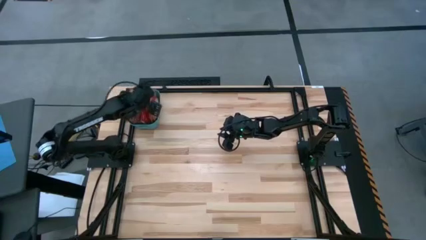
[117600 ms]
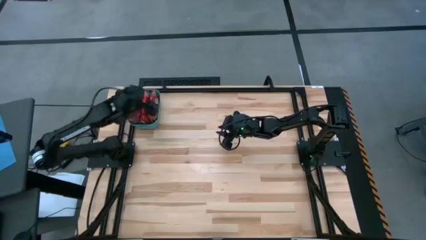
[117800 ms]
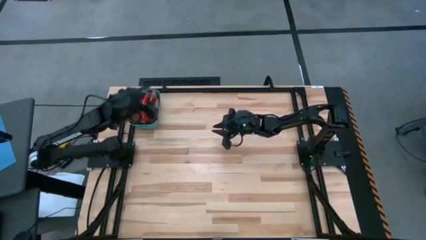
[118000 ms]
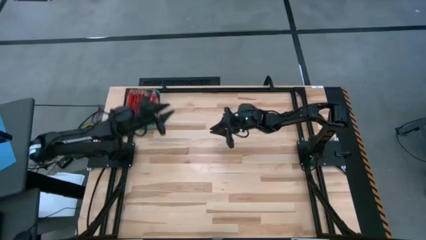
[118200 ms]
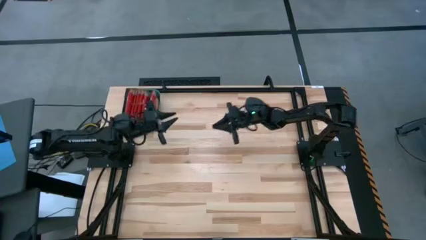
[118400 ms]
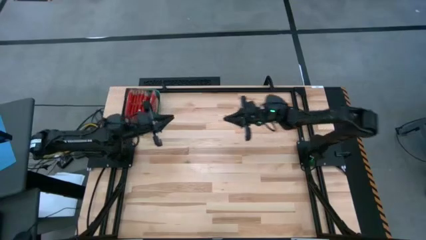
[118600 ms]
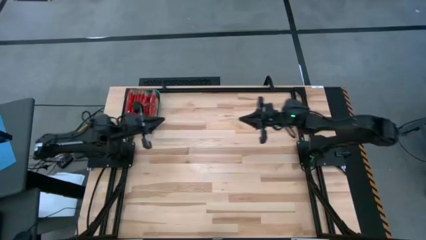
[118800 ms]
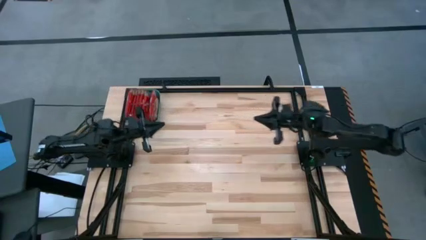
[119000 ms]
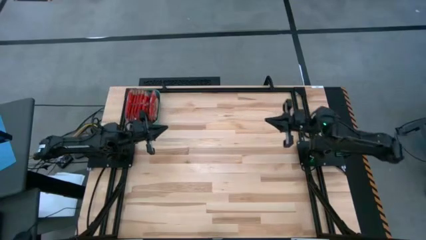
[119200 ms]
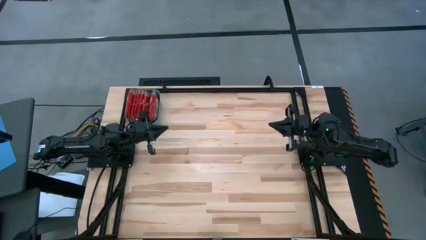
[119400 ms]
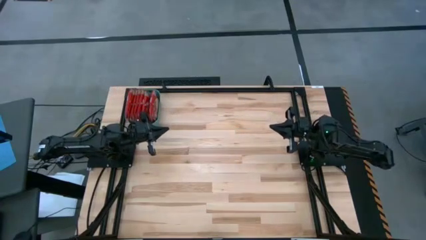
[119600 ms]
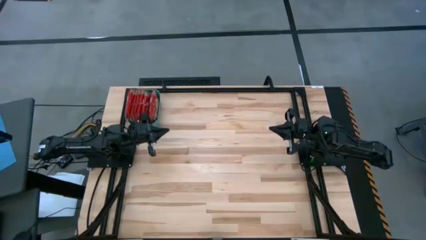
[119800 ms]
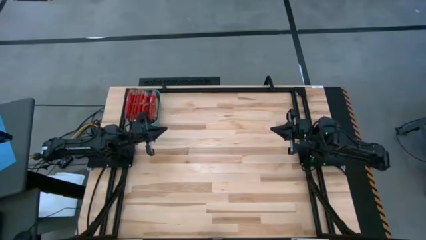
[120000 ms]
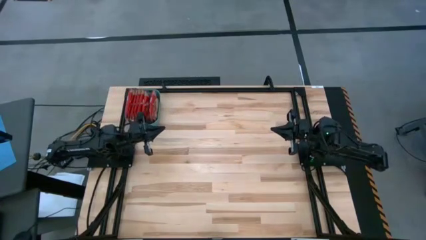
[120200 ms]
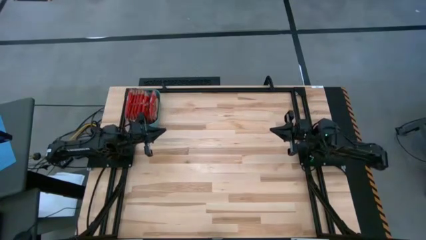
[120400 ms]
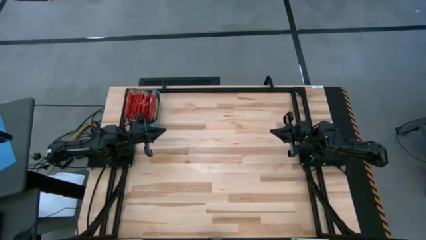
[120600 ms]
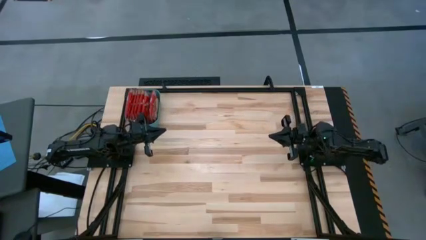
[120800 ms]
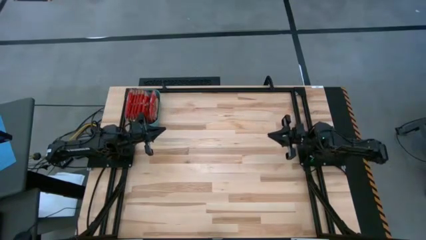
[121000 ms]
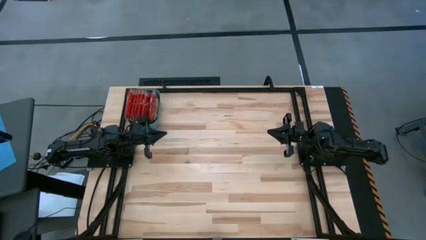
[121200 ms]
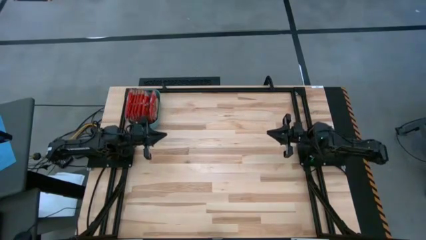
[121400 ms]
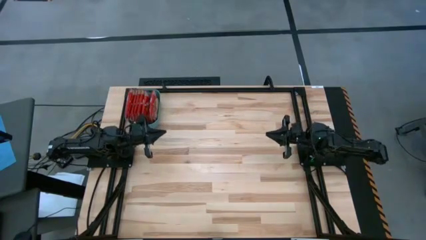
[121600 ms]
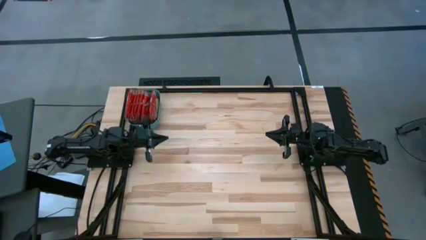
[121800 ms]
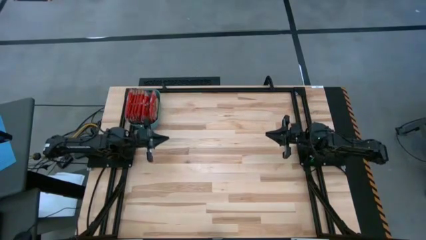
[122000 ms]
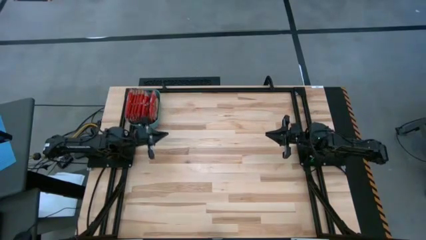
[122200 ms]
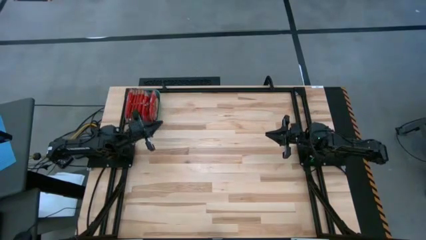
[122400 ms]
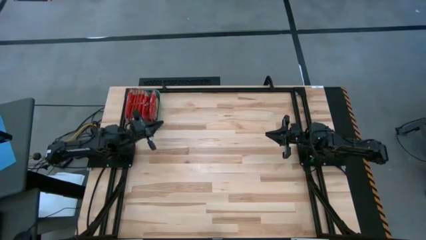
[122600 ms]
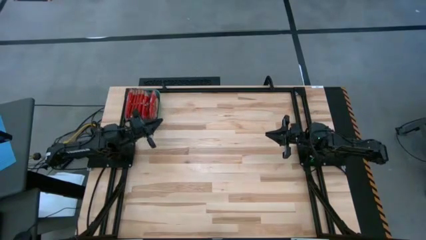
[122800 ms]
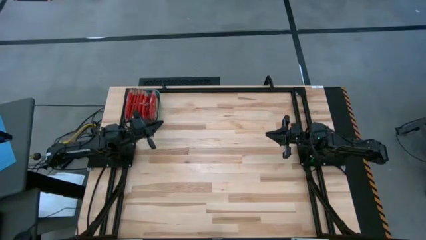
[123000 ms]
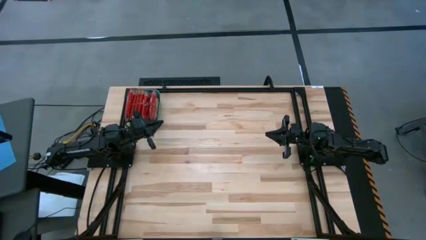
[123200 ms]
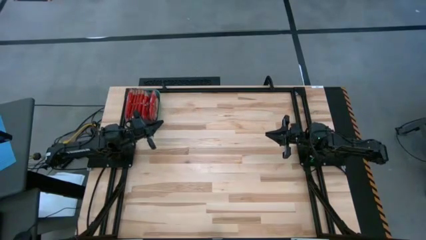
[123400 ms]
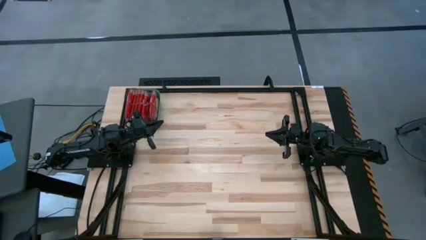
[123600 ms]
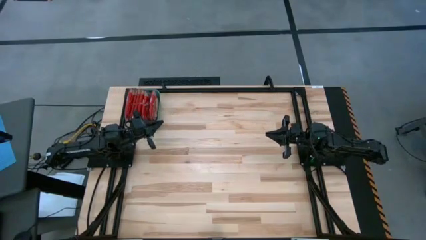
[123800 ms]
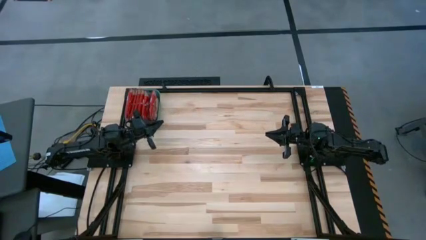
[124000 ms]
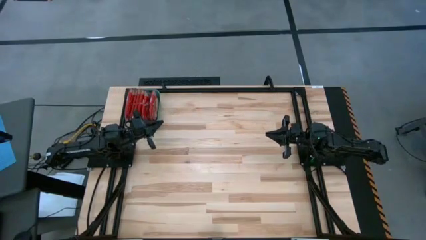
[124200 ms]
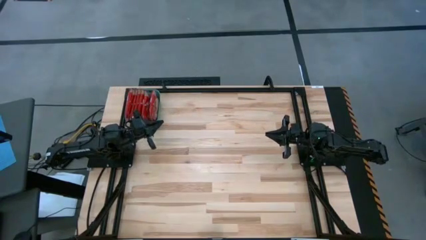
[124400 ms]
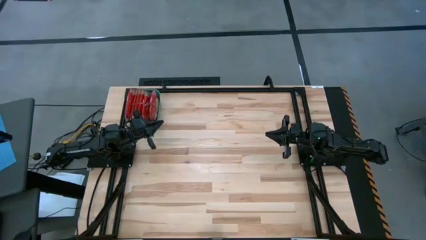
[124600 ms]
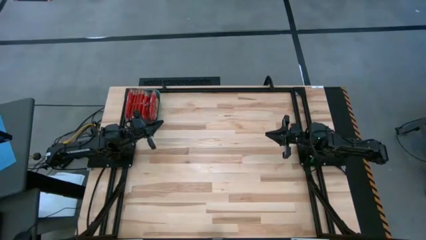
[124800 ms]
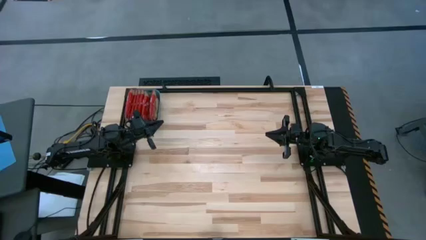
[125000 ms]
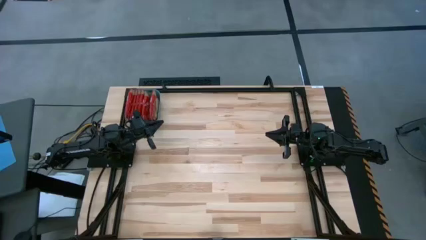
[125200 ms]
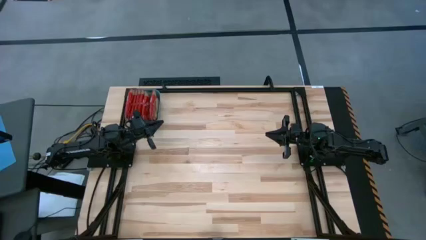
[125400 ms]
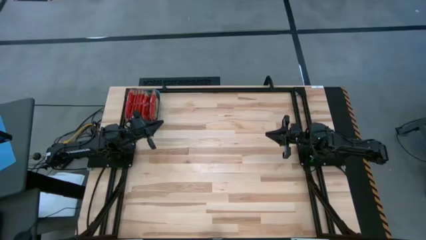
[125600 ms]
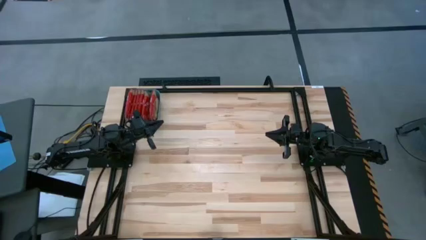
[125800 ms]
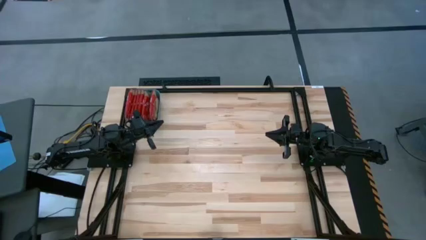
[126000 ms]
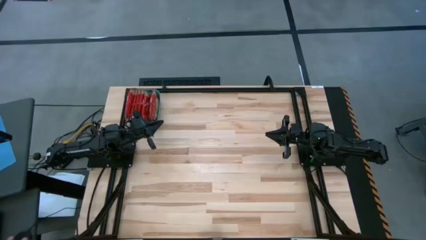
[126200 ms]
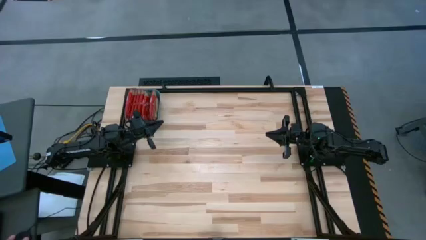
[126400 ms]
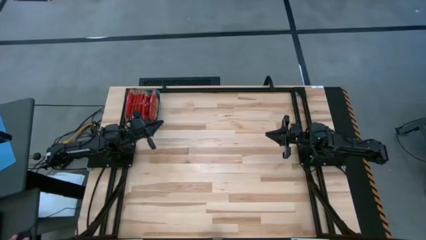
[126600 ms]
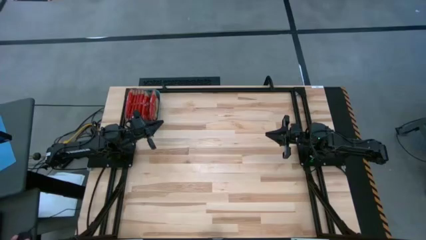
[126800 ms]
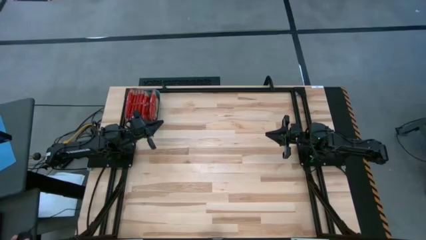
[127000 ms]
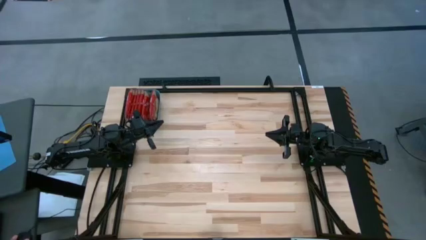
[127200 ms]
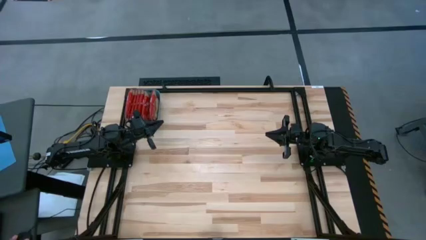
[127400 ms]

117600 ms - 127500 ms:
Task: Sort popcorn bags into baskets
Return to Home Position
